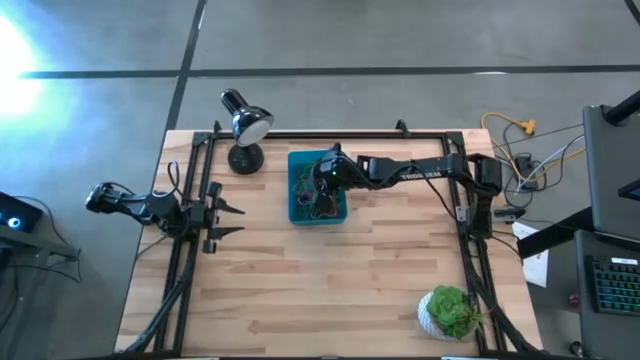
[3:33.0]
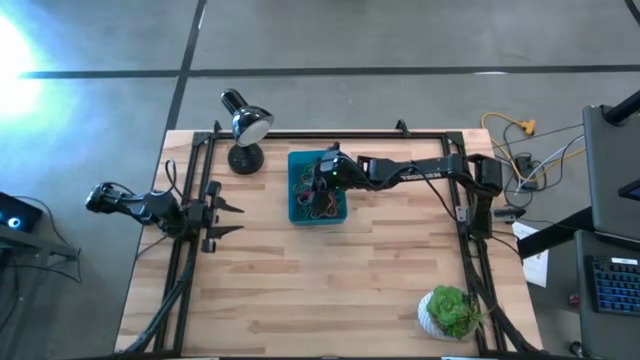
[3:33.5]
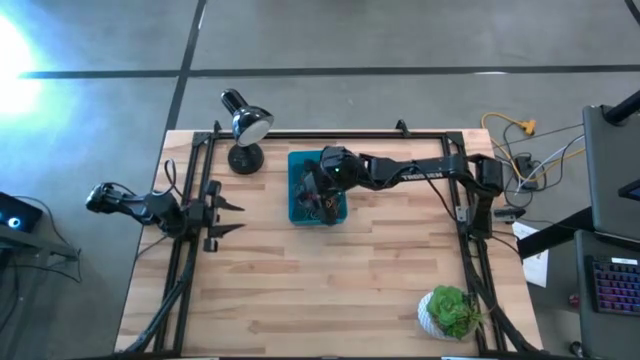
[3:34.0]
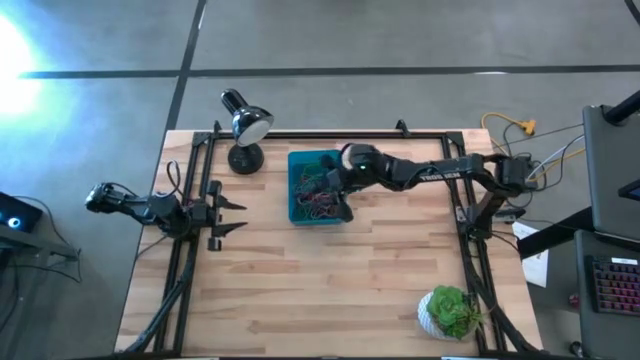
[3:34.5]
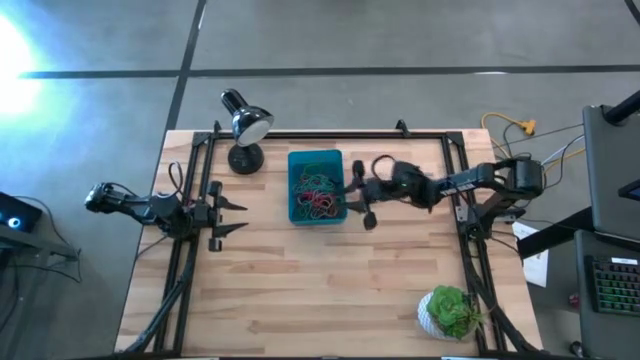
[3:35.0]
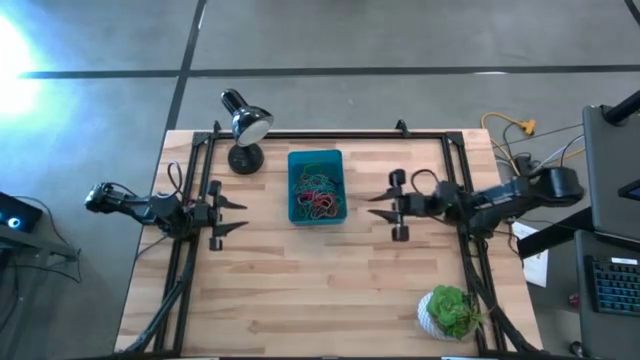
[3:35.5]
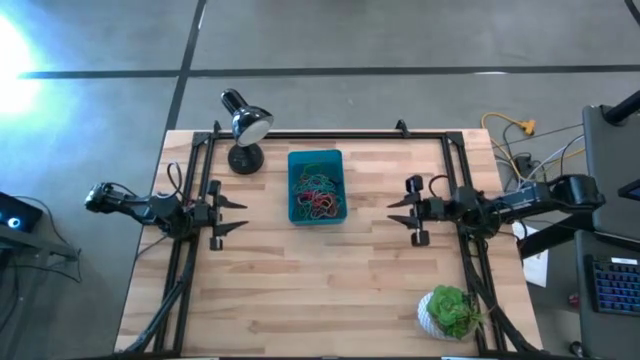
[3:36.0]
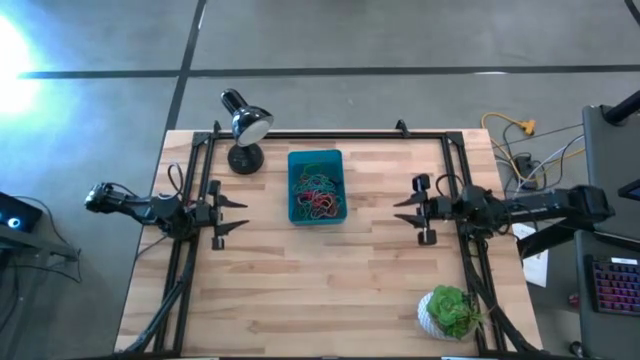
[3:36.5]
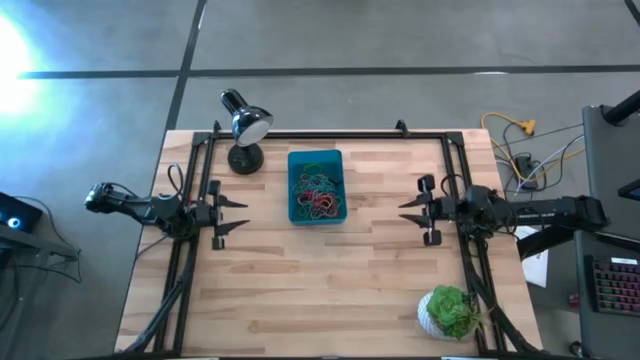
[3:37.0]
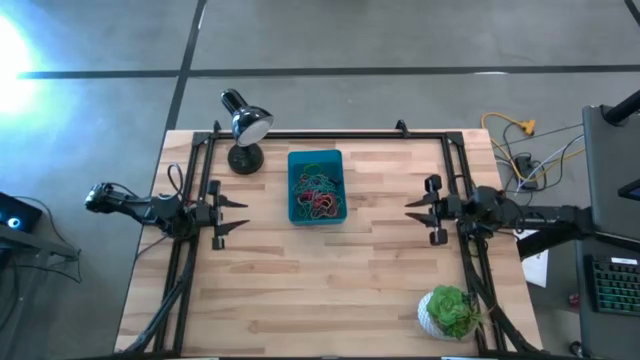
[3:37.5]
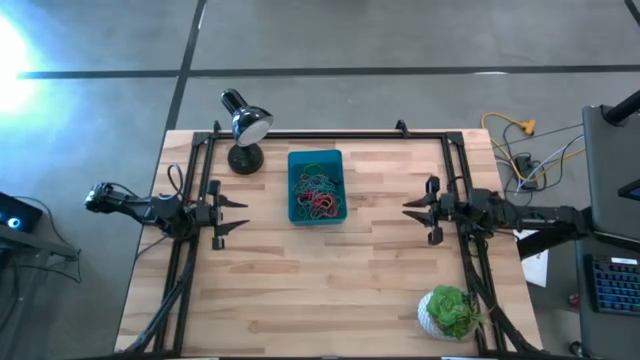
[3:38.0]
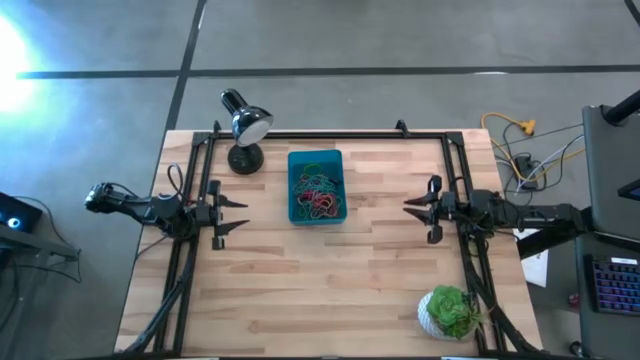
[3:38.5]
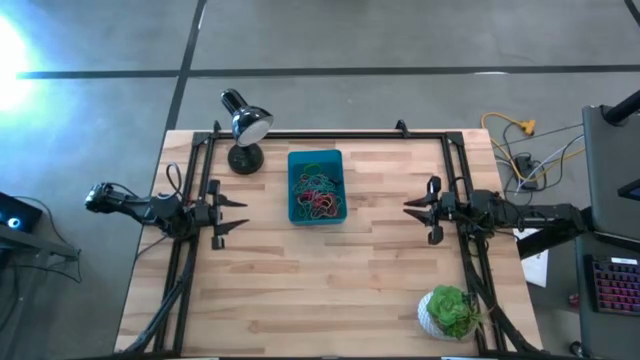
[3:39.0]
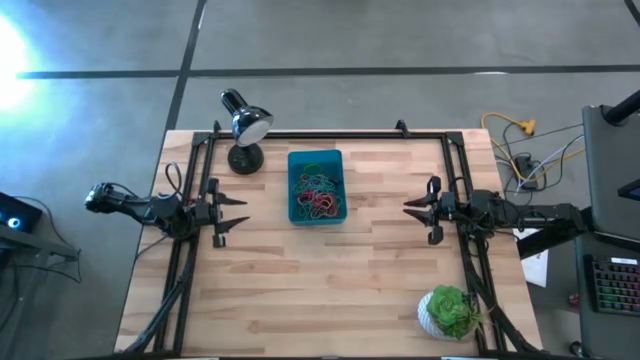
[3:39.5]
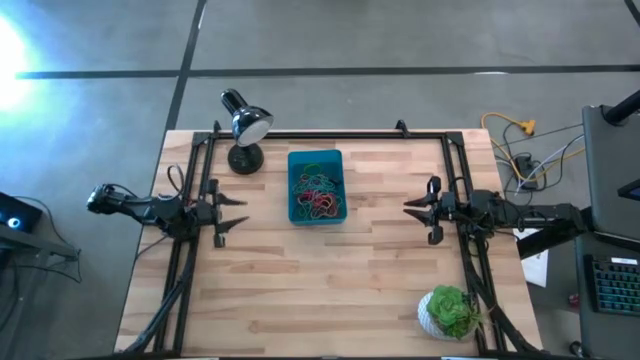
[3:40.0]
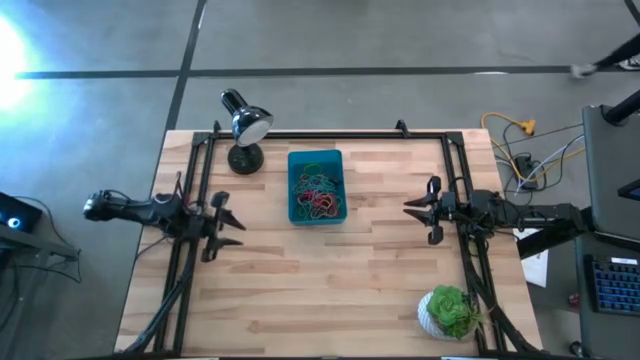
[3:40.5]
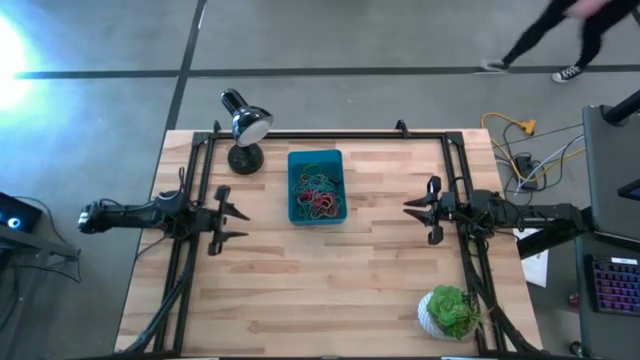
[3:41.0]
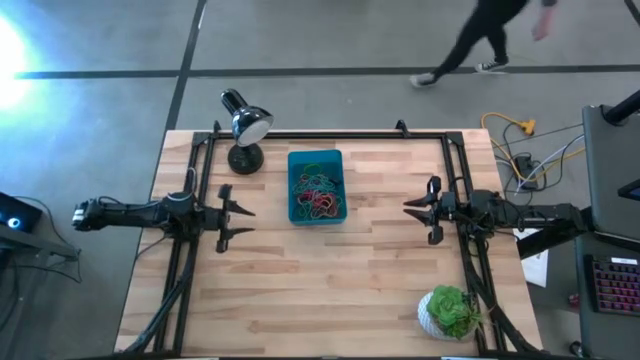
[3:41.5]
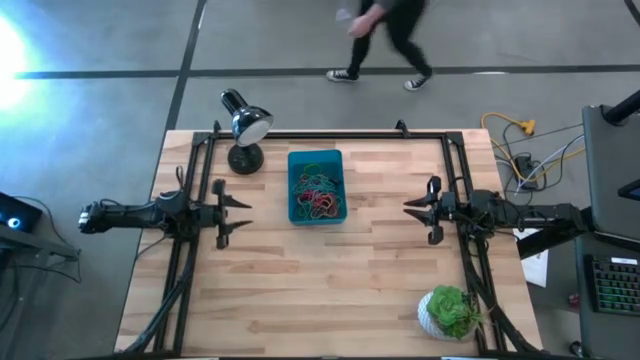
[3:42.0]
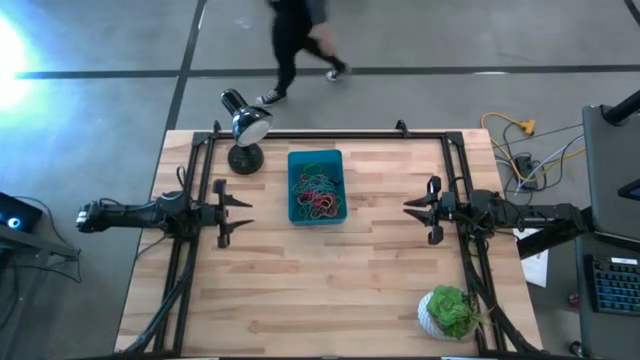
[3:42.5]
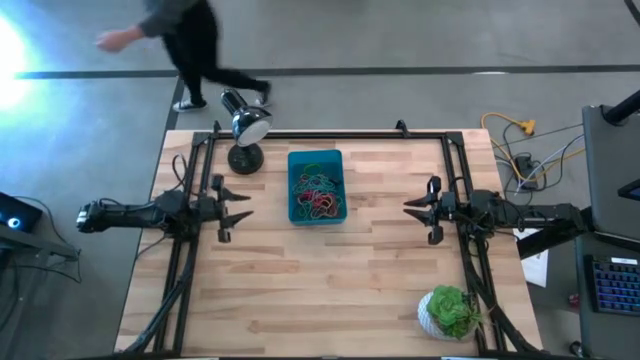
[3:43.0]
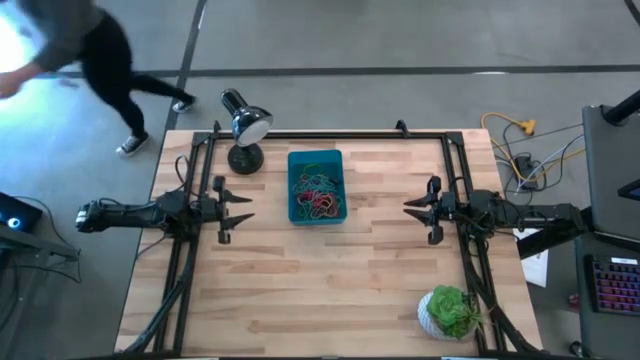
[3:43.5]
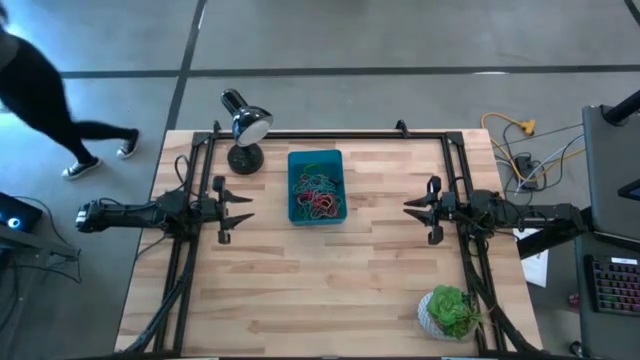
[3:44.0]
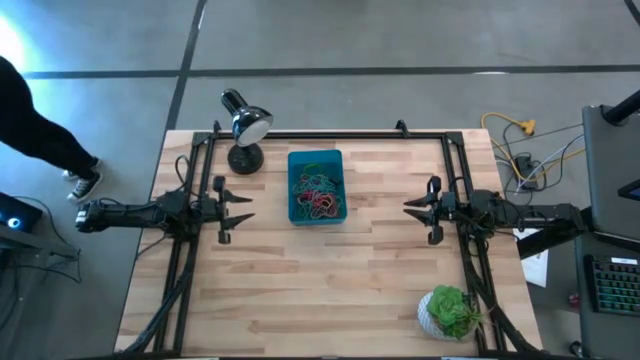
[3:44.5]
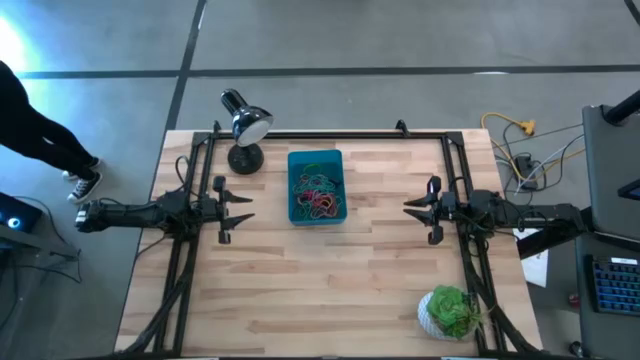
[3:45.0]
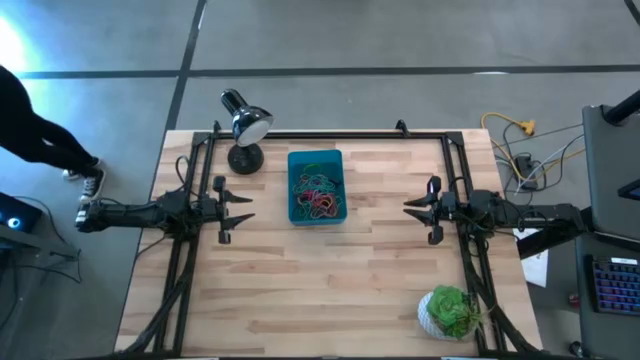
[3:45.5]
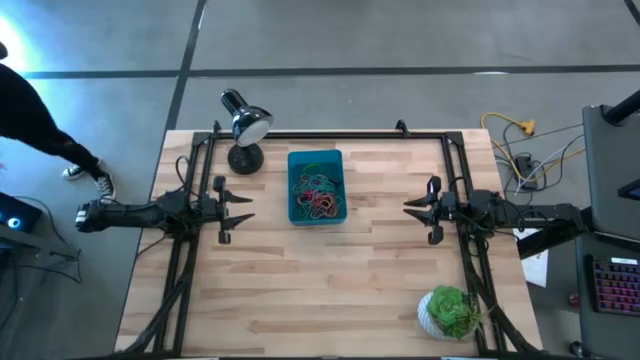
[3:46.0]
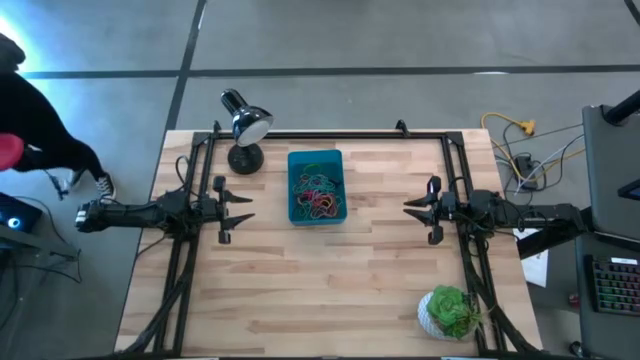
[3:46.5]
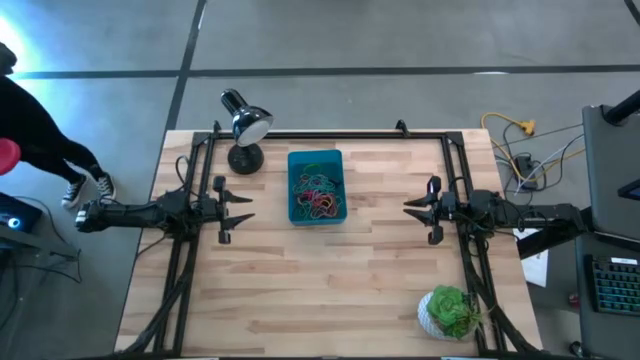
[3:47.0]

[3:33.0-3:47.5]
Task: Pick and place rubber bands into bin
Return to Home Position

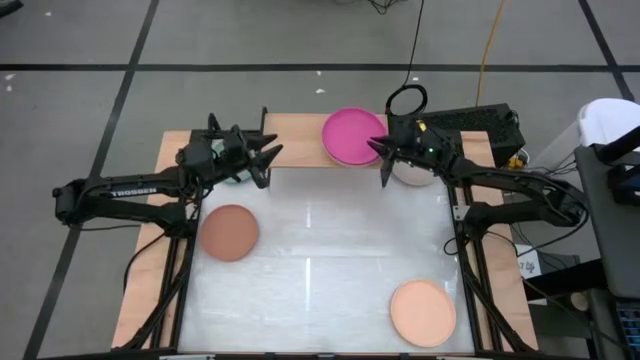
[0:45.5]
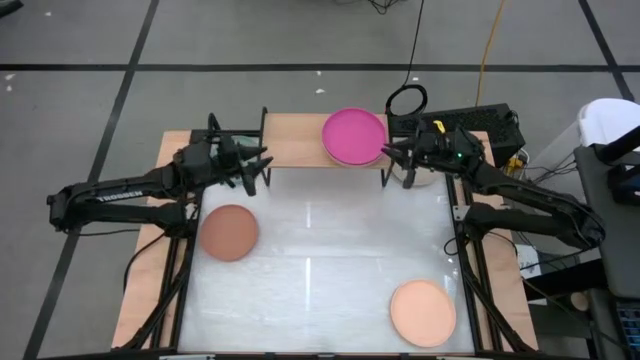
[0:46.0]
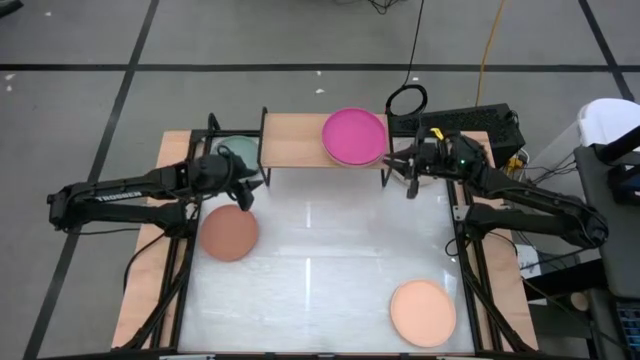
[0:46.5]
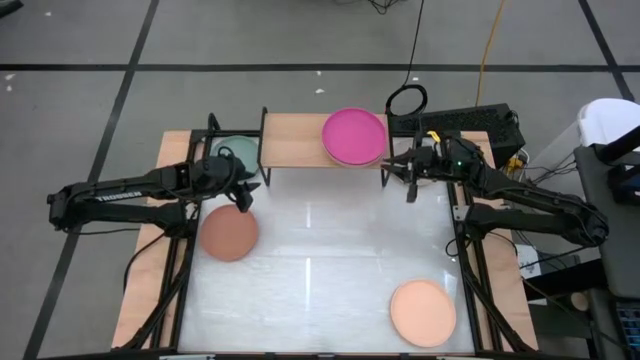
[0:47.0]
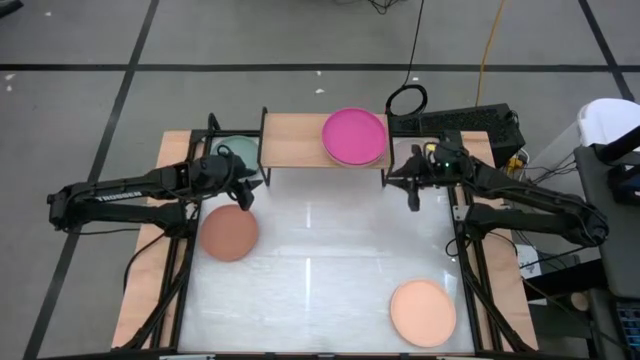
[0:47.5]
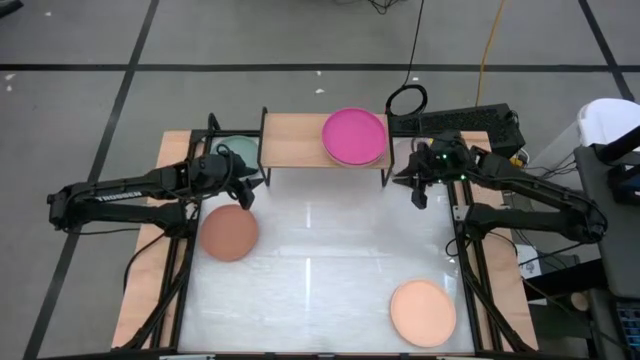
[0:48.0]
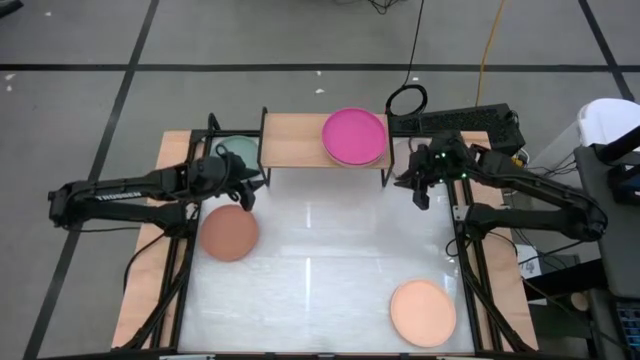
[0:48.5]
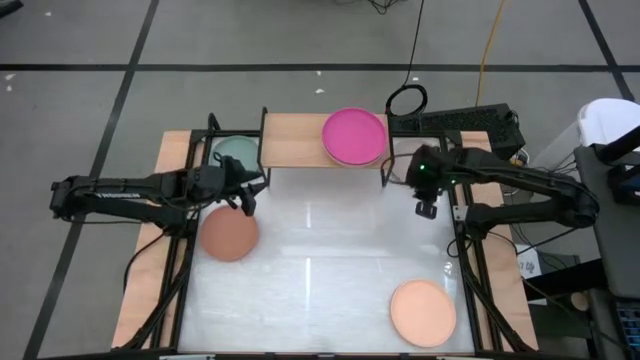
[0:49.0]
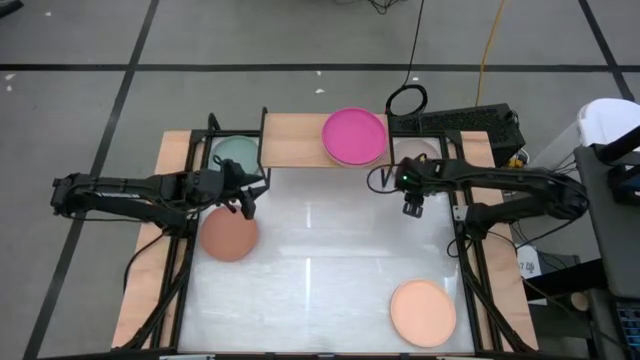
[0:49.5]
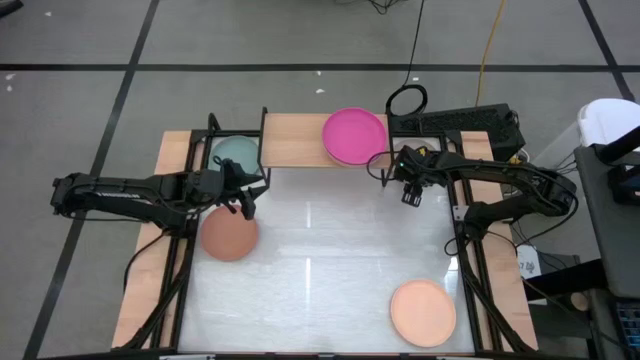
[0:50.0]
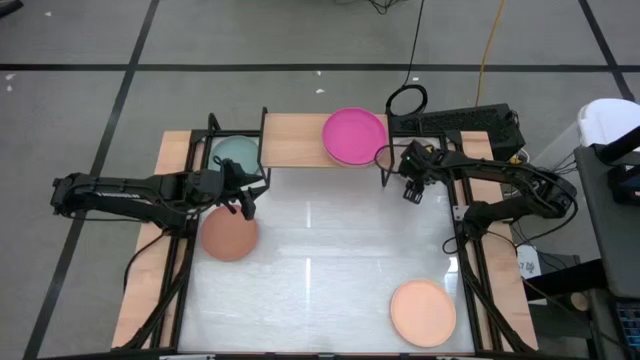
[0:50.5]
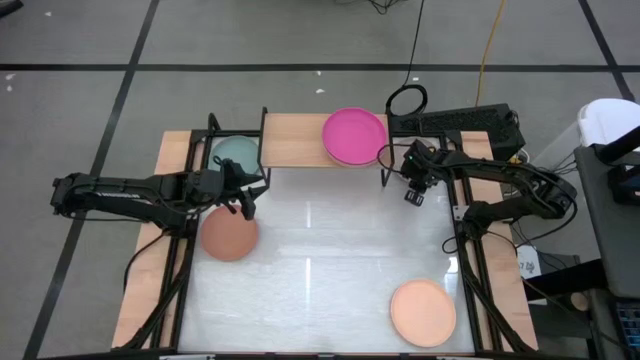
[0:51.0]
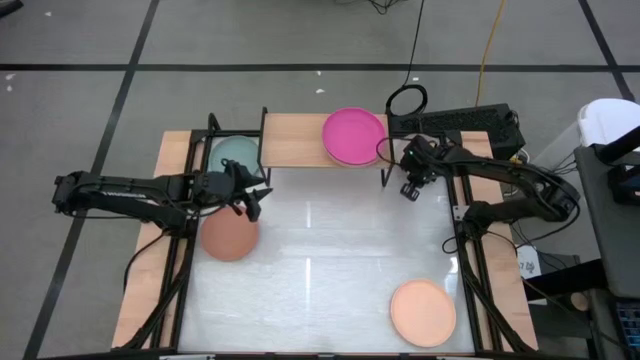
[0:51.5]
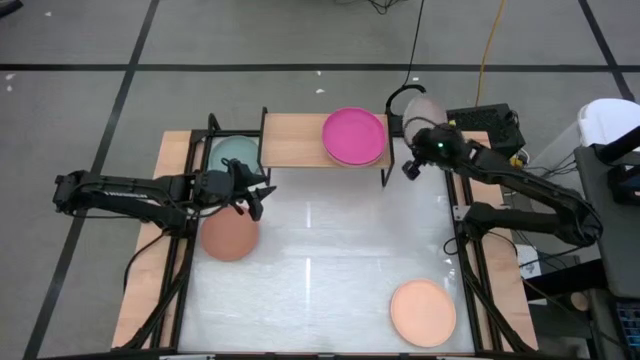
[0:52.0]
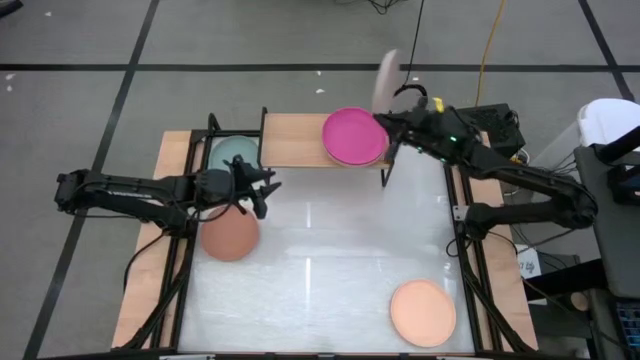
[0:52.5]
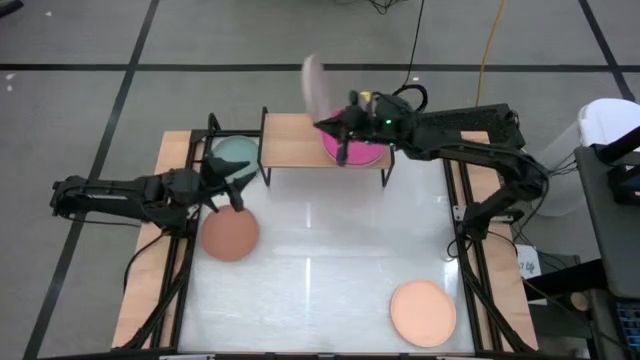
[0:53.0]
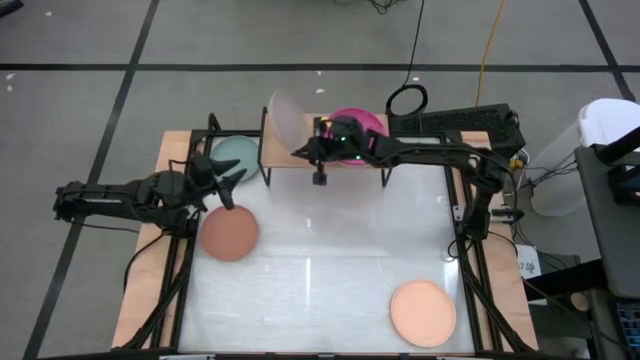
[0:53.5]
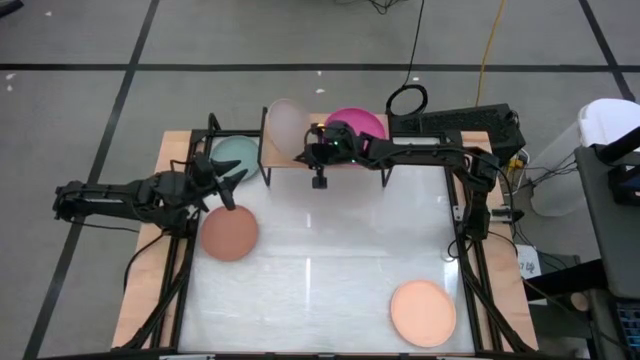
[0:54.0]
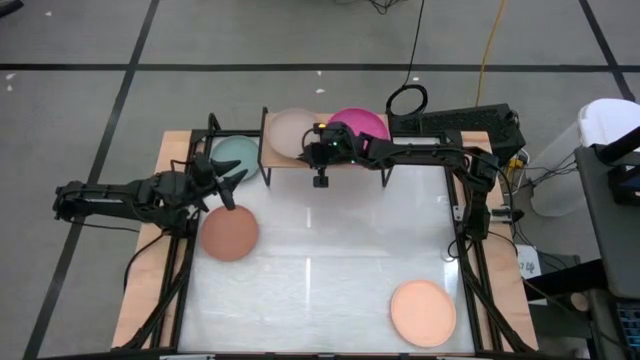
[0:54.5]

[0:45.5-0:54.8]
Task: Place and stack plates onto a shelf
Put the light brown plate on the shelf
